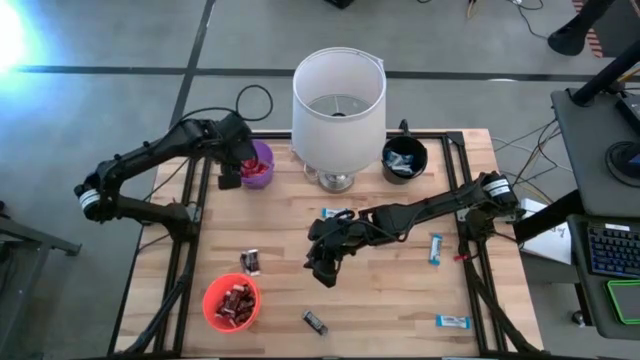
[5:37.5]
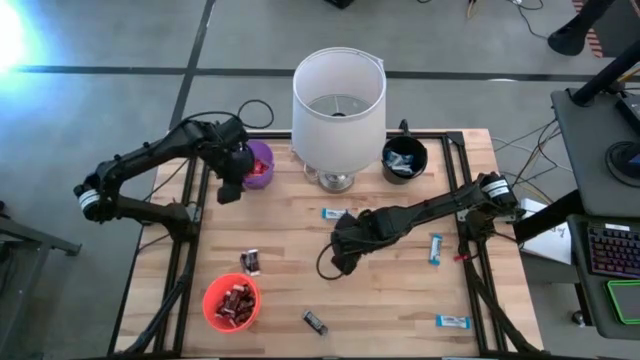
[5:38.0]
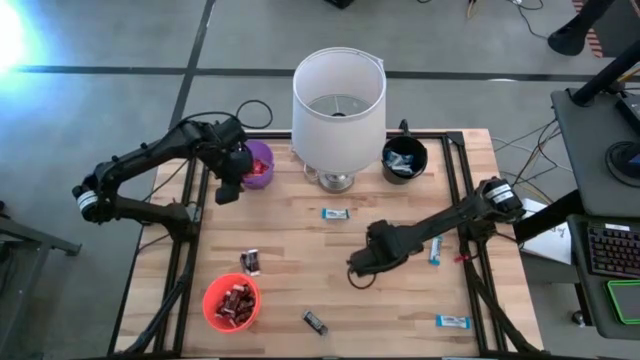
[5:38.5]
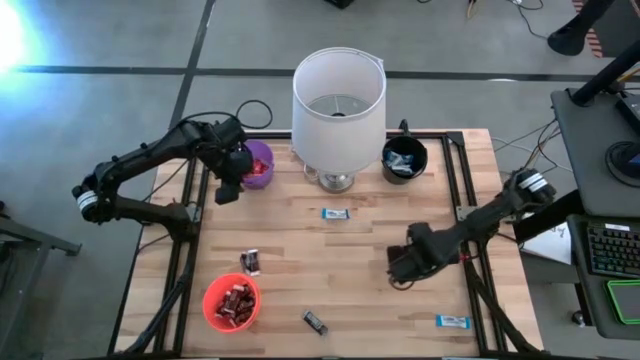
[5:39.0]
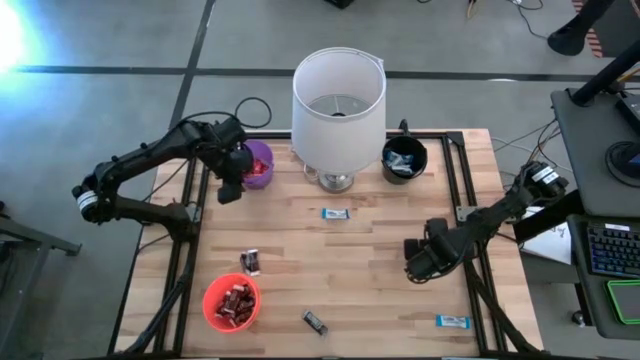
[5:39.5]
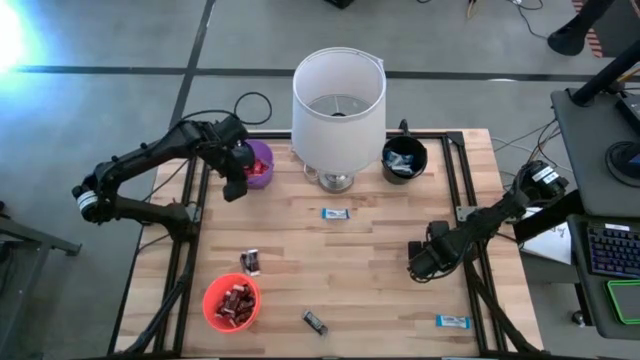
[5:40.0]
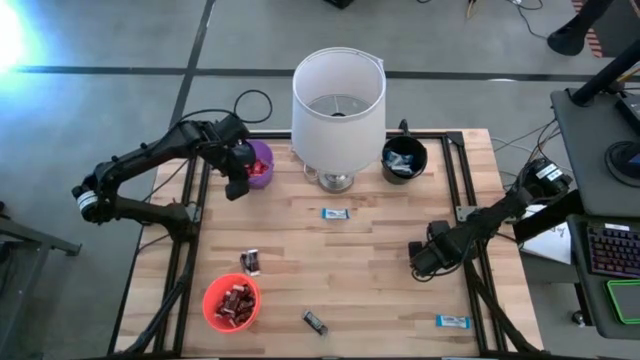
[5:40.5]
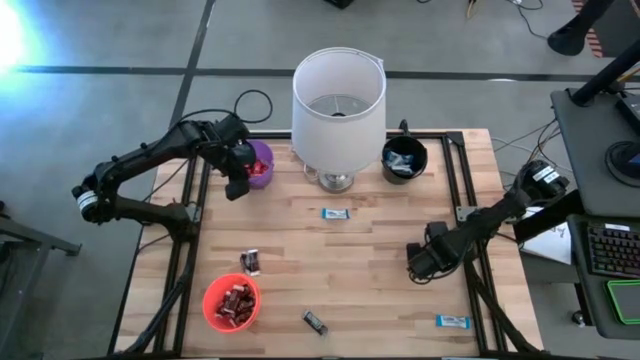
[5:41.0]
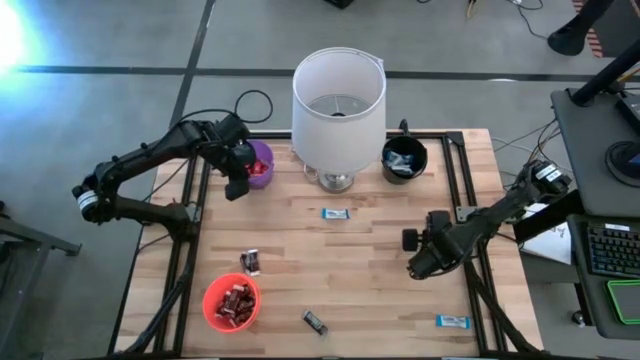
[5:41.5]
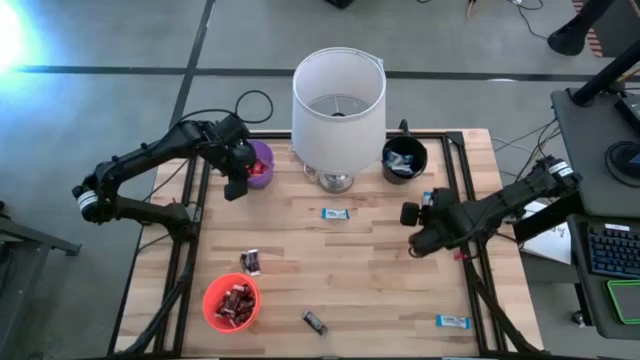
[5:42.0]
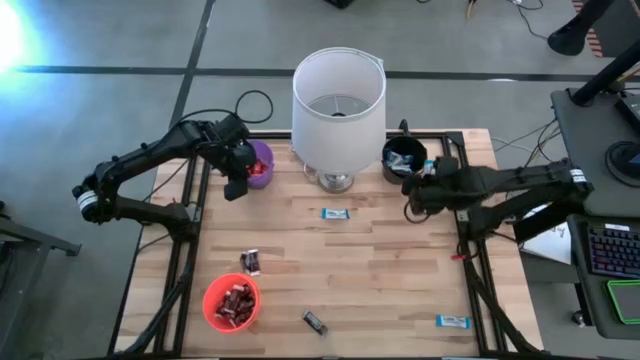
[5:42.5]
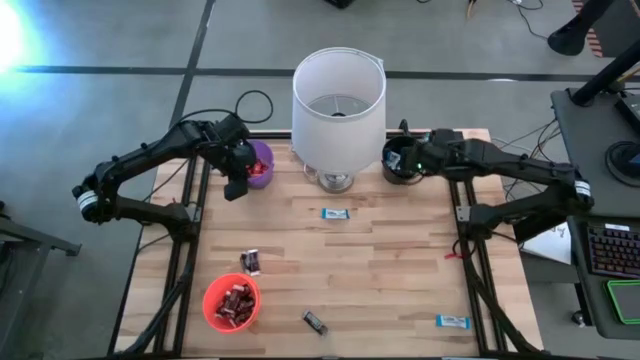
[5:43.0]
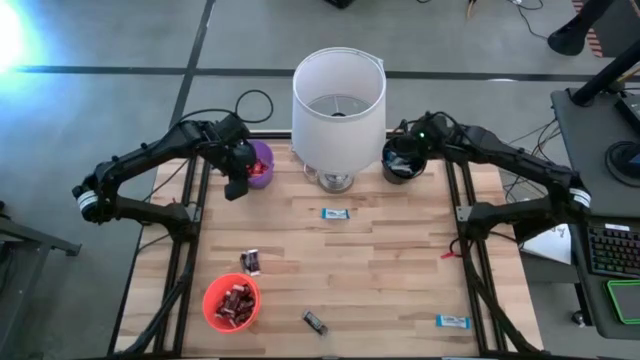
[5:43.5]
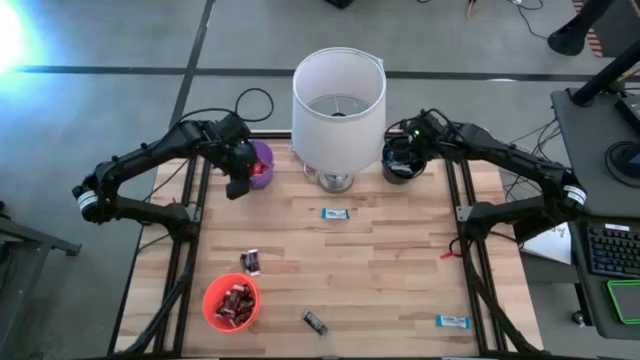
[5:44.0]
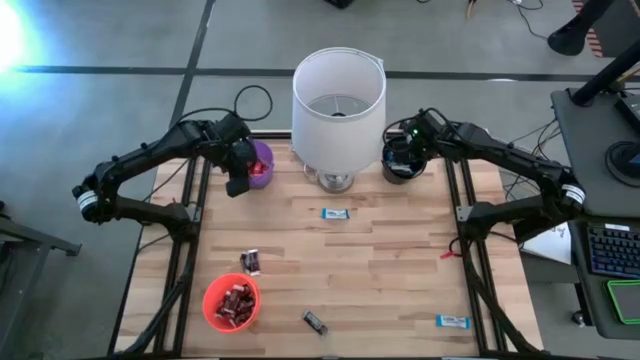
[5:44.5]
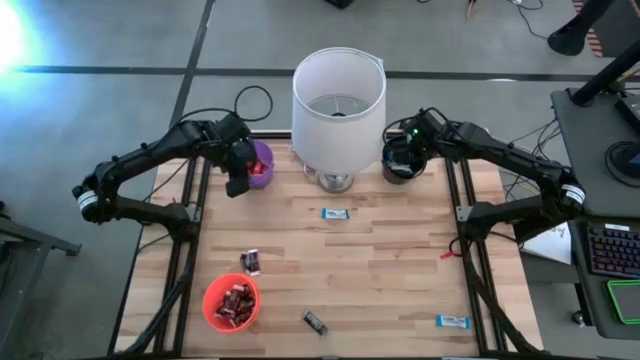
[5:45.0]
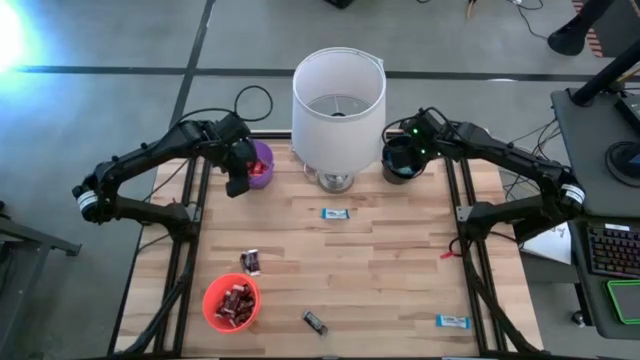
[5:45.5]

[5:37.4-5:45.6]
Task: Sort candy
Put the white chocolate into the black bin

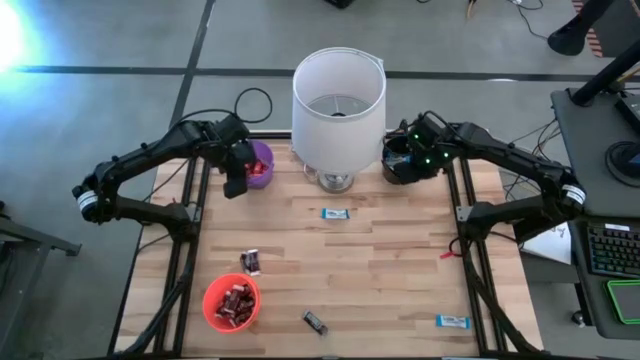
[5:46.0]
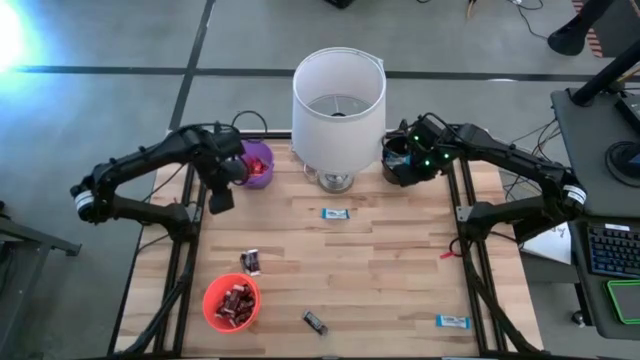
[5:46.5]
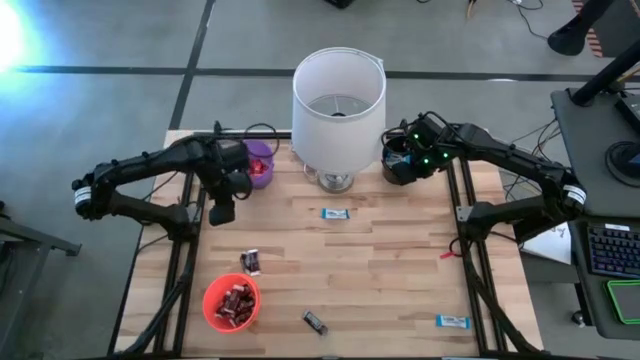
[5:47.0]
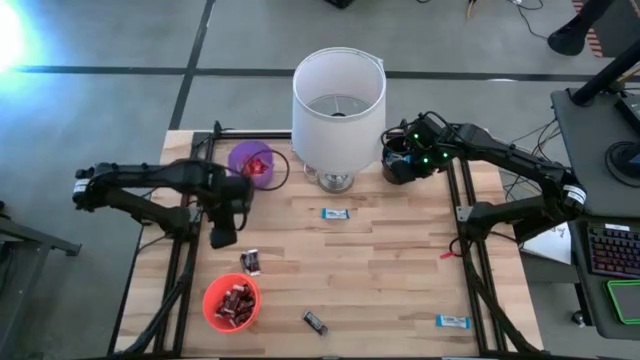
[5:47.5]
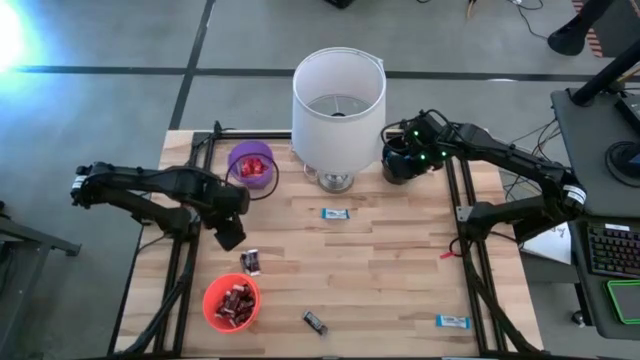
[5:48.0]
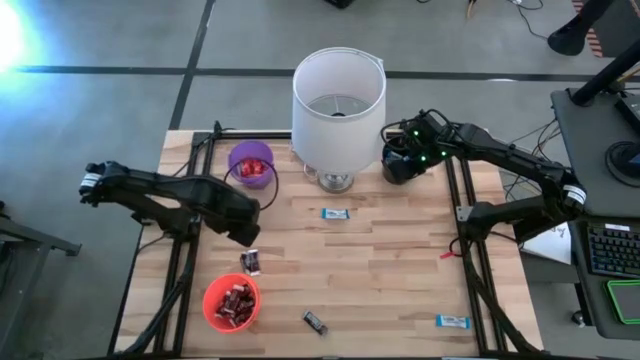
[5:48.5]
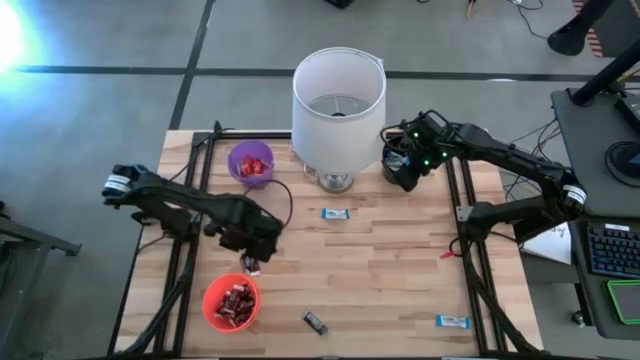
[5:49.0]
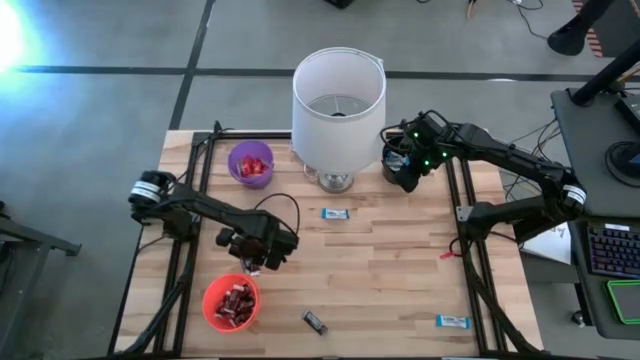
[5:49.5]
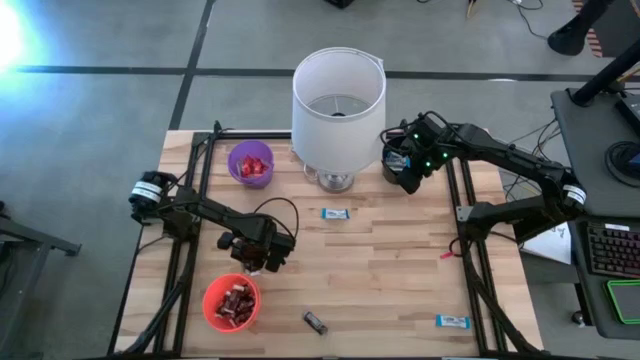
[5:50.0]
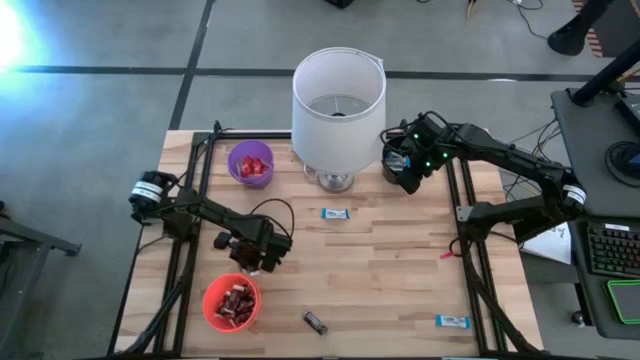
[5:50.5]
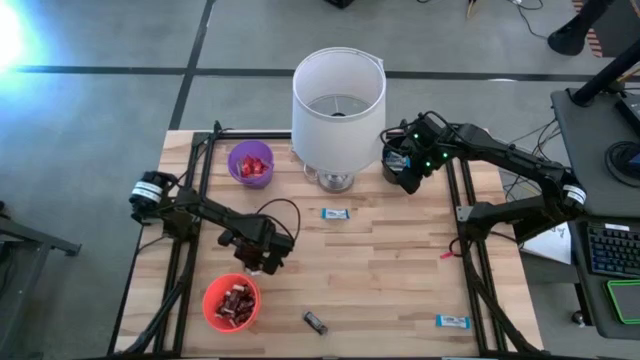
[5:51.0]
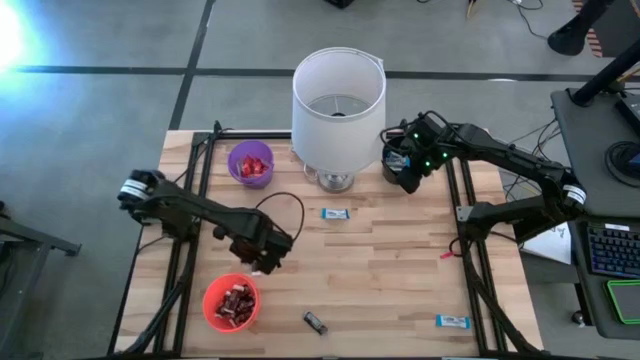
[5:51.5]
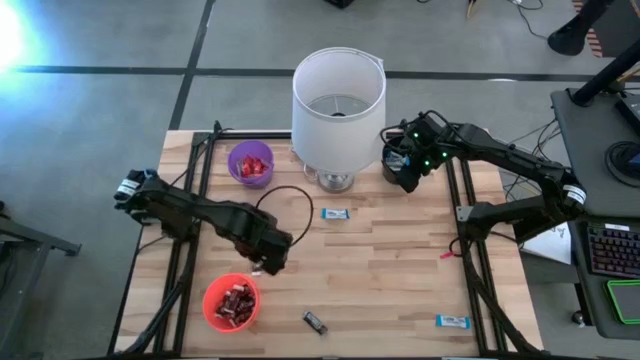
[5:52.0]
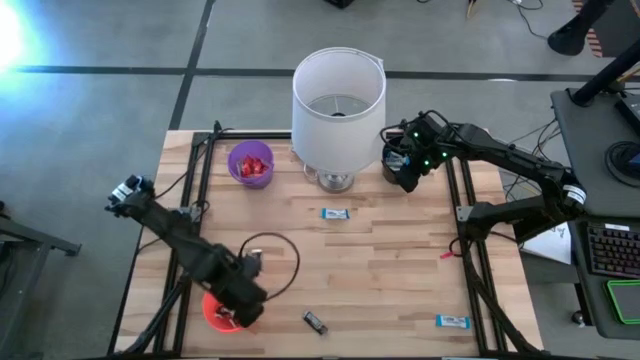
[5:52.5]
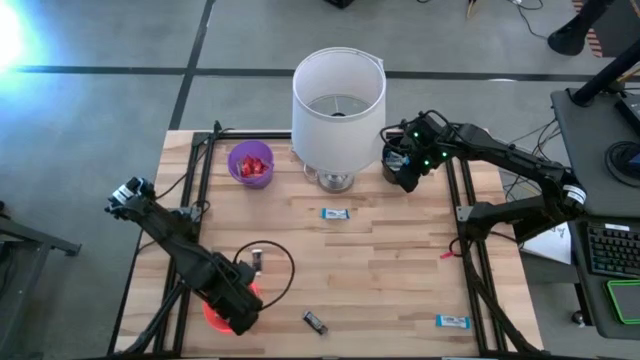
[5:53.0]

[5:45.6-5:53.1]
Put the black chocolate into the orange bucket

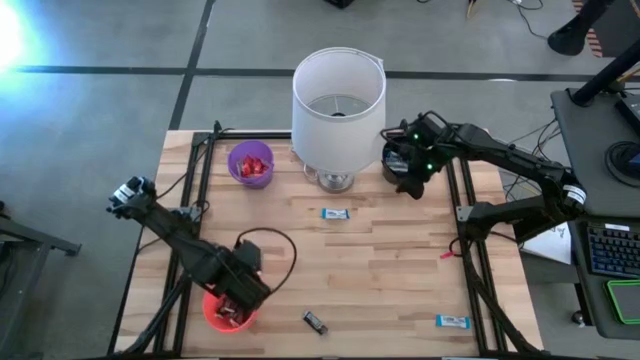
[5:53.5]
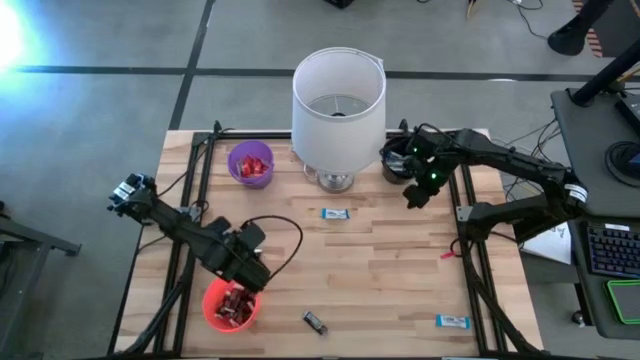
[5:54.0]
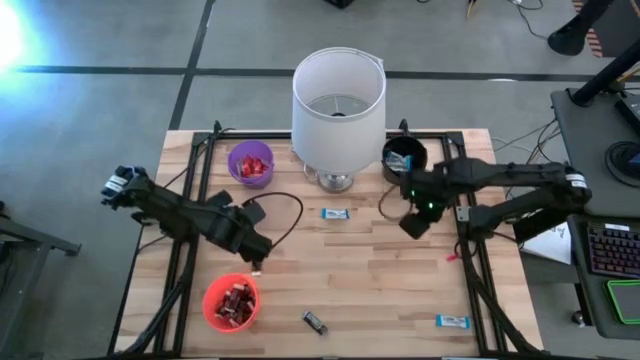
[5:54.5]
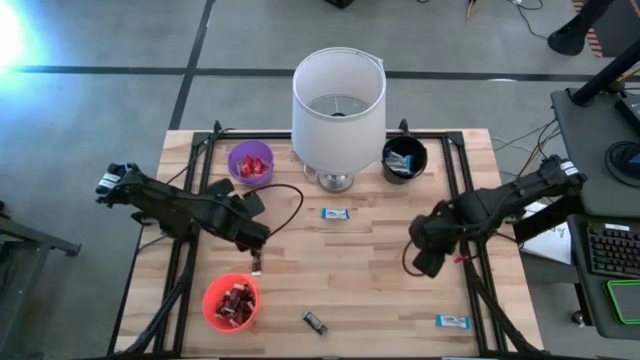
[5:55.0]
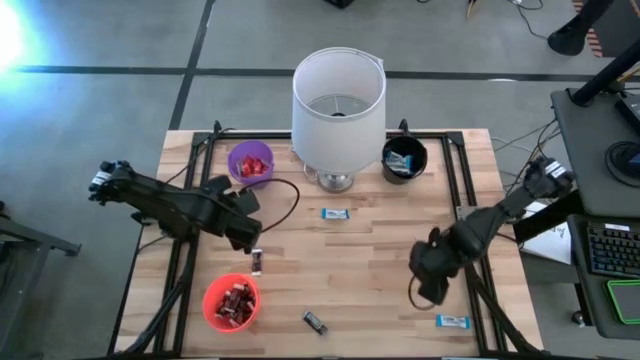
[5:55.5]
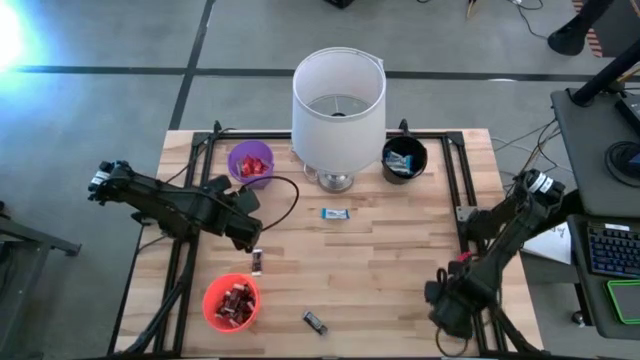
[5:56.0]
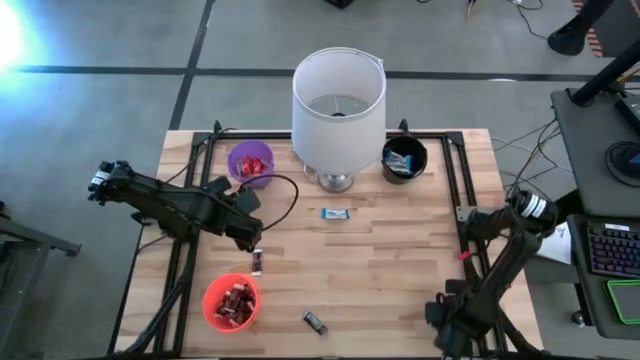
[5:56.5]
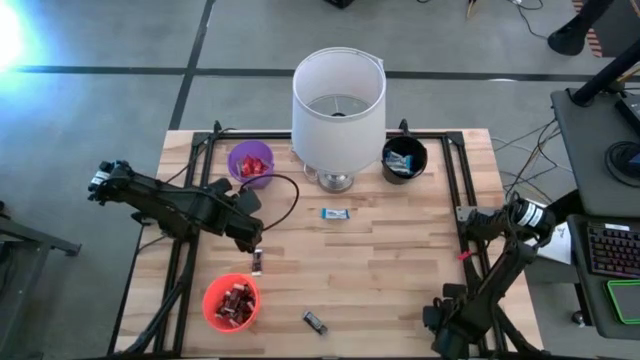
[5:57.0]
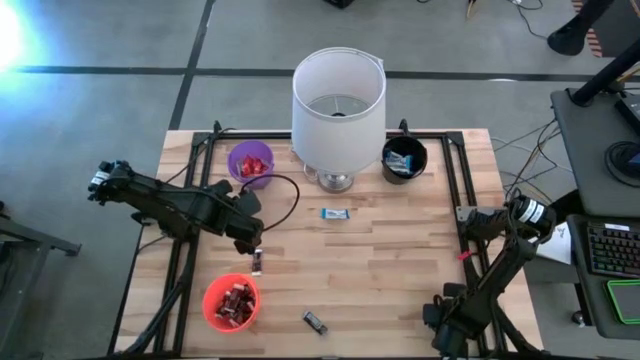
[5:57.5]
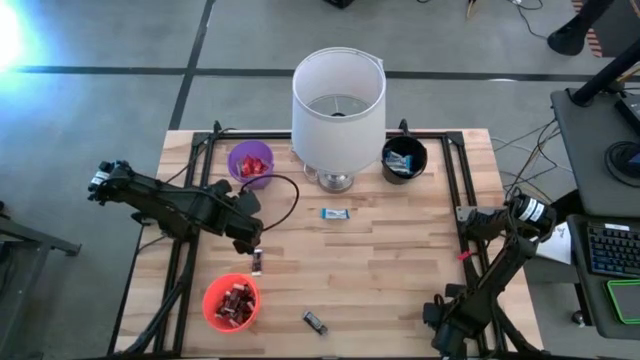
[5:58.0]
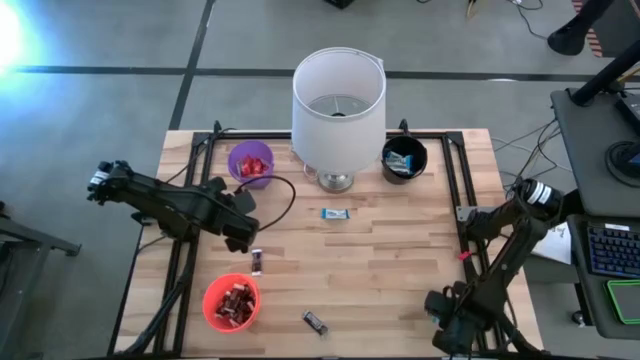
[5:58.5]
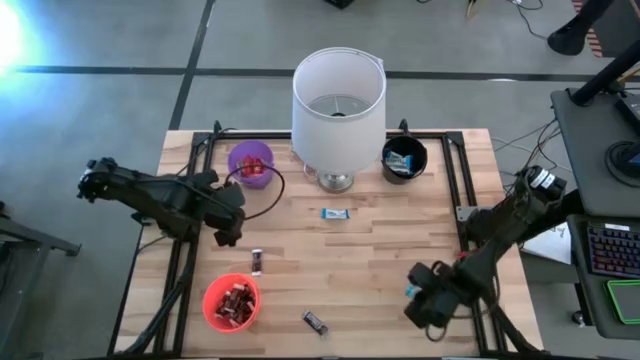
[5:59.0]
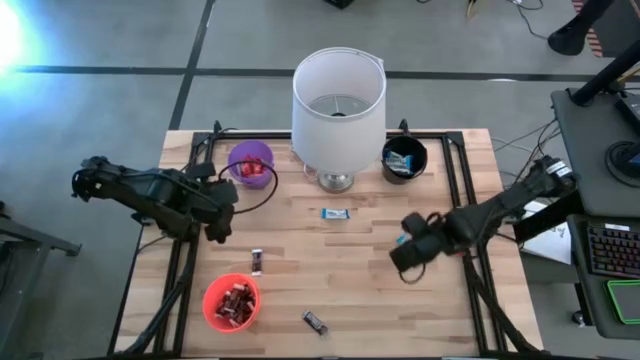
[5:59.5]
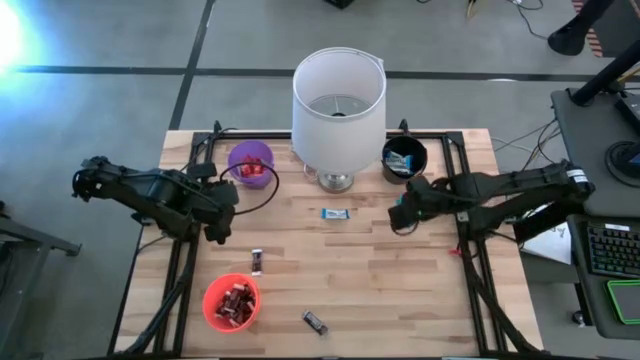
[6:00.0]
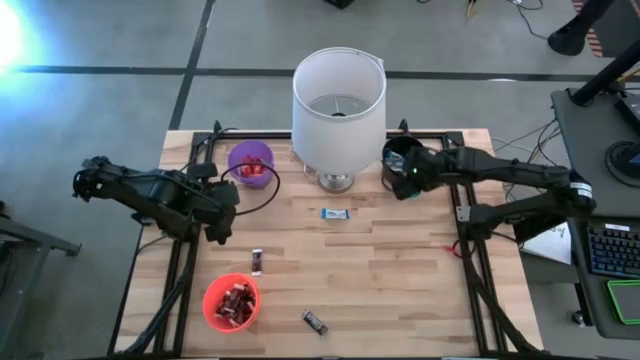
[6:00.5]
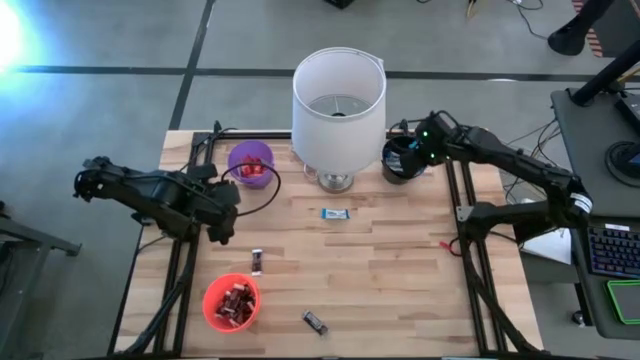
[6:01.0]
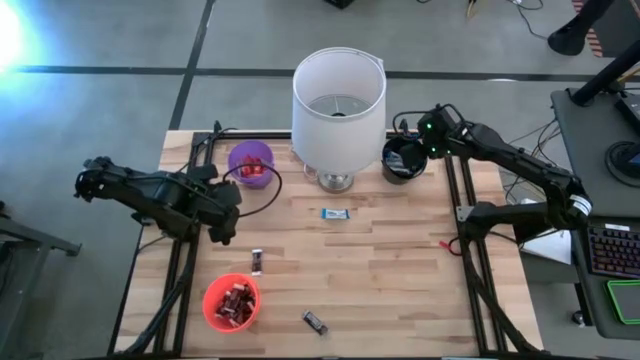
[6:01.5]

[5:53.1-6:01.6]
Put the white chocolate into the black bin
